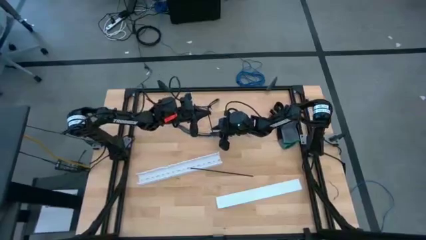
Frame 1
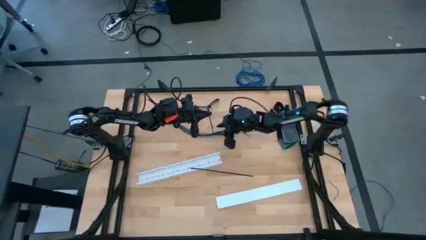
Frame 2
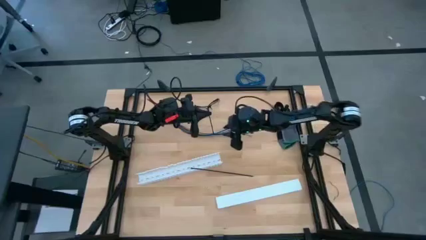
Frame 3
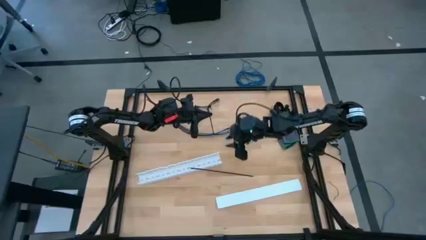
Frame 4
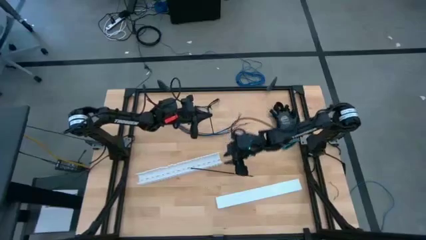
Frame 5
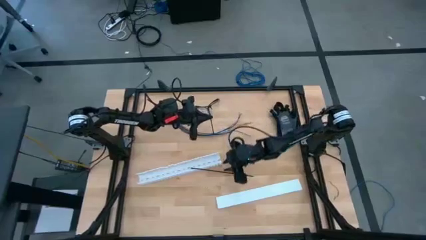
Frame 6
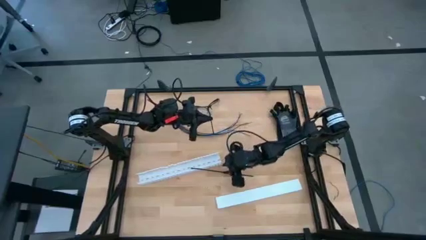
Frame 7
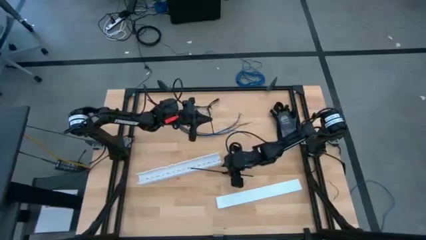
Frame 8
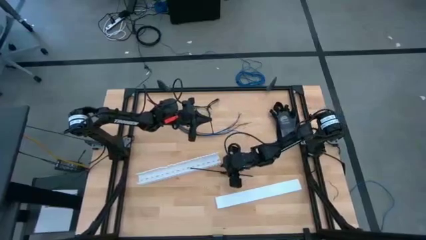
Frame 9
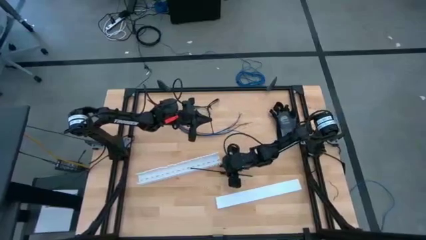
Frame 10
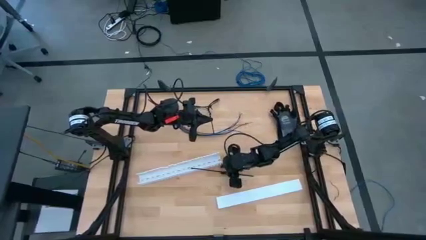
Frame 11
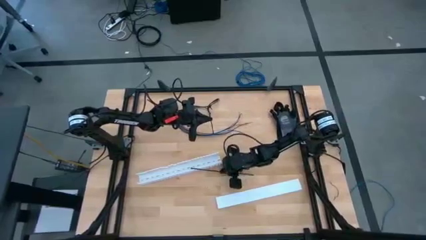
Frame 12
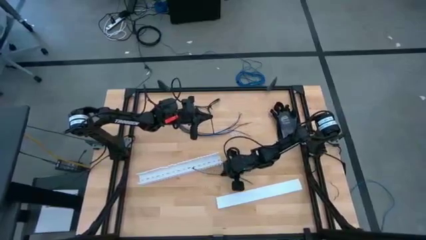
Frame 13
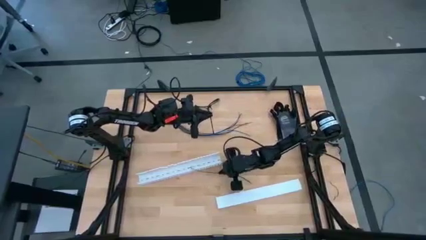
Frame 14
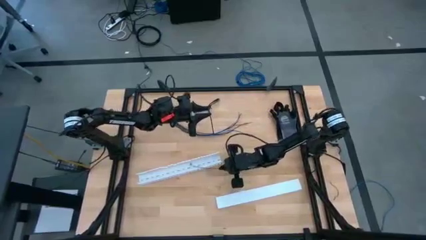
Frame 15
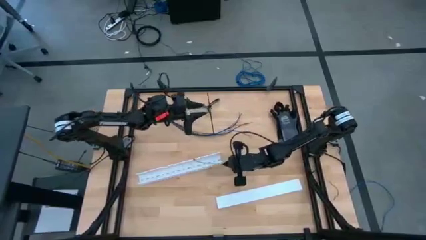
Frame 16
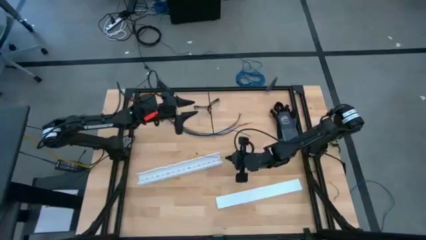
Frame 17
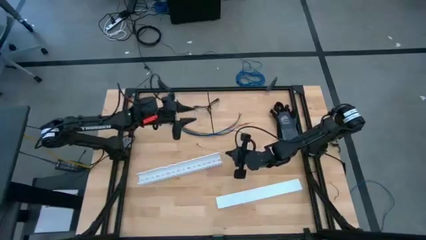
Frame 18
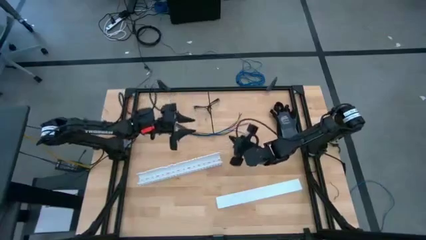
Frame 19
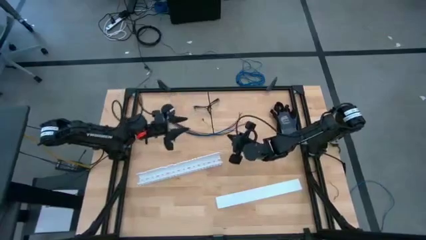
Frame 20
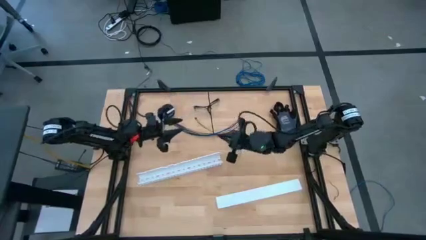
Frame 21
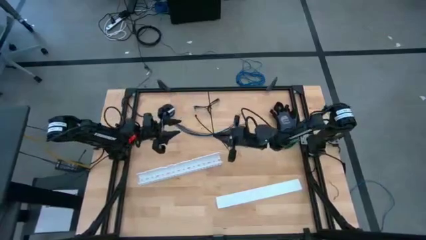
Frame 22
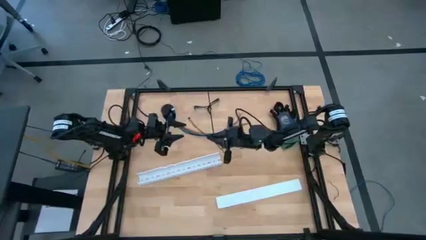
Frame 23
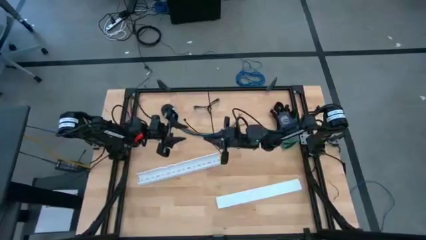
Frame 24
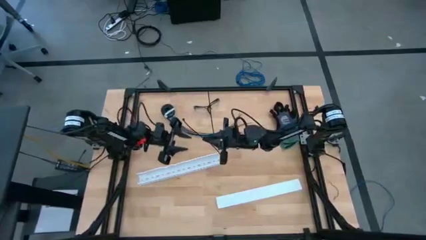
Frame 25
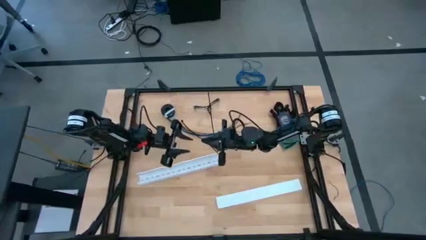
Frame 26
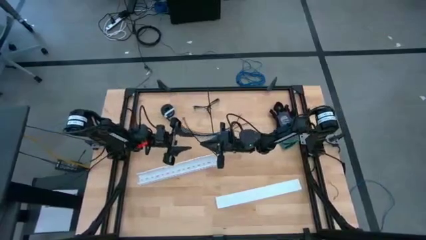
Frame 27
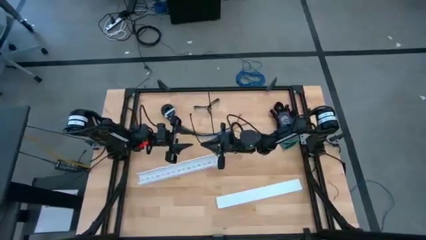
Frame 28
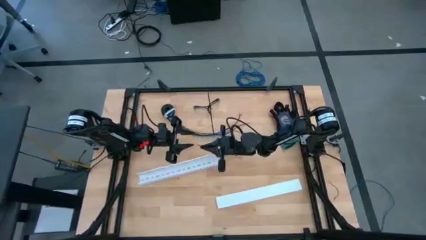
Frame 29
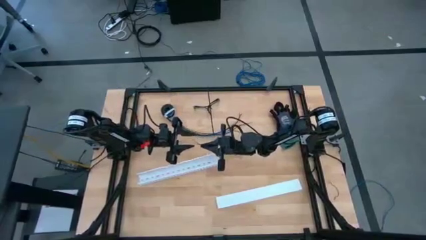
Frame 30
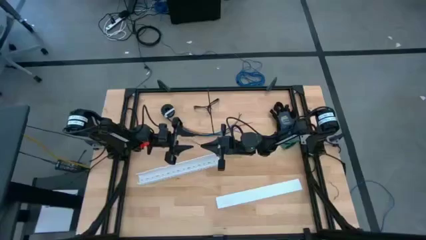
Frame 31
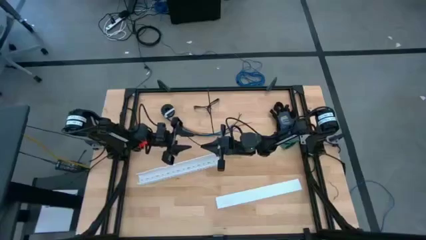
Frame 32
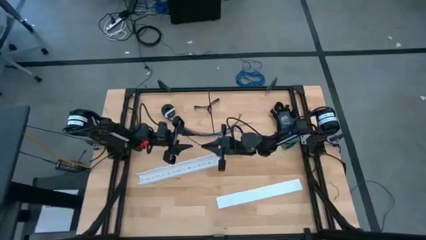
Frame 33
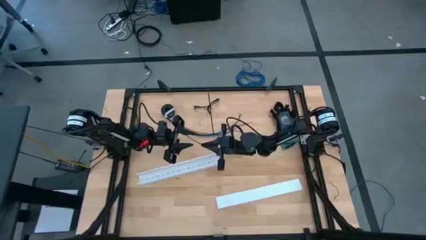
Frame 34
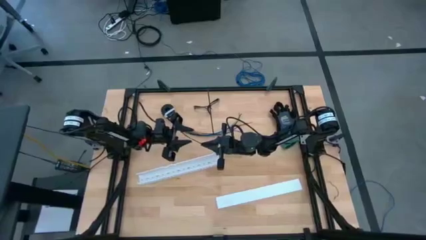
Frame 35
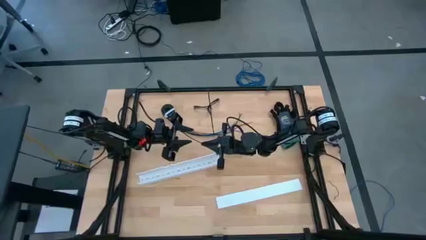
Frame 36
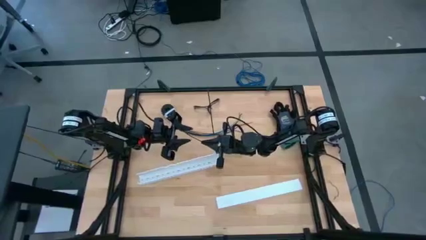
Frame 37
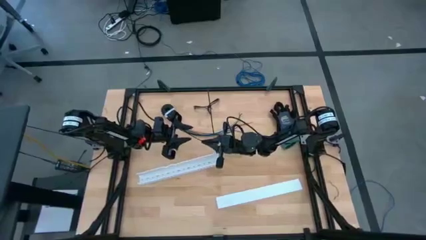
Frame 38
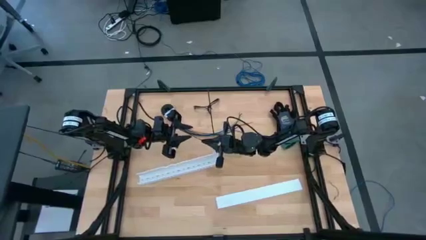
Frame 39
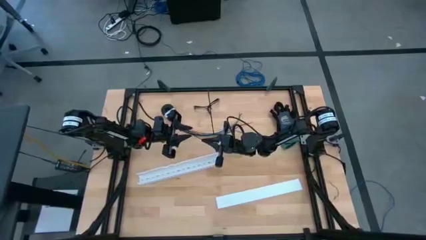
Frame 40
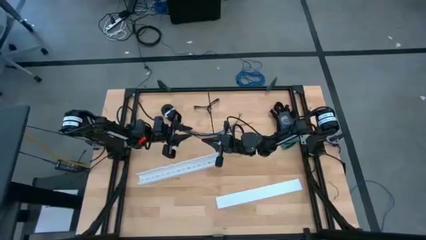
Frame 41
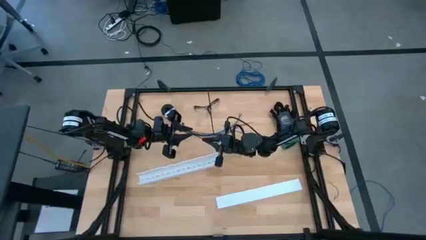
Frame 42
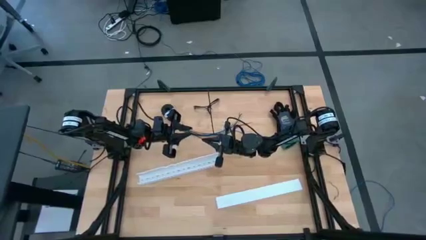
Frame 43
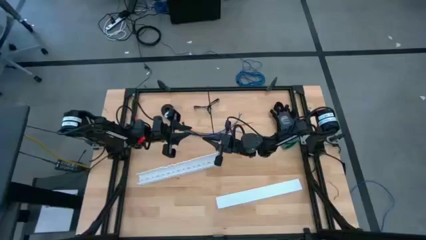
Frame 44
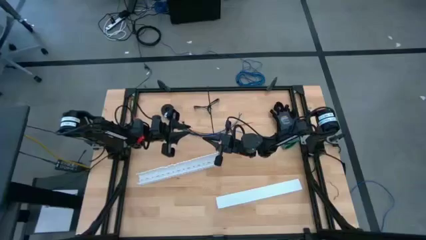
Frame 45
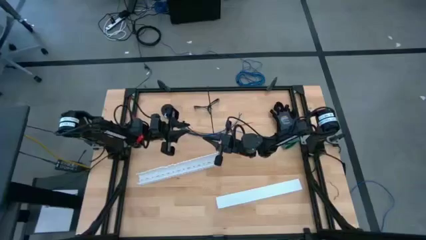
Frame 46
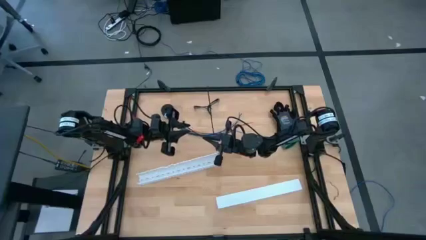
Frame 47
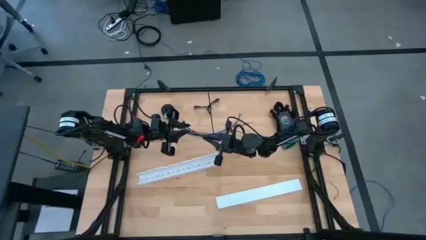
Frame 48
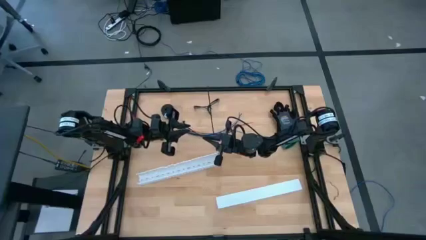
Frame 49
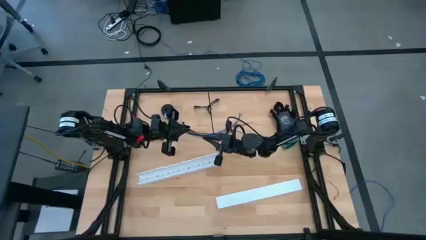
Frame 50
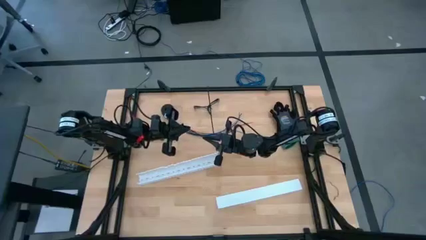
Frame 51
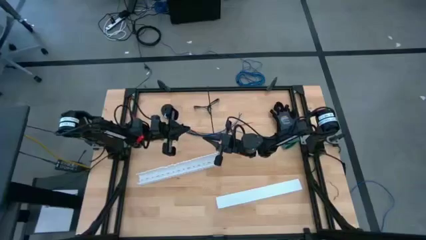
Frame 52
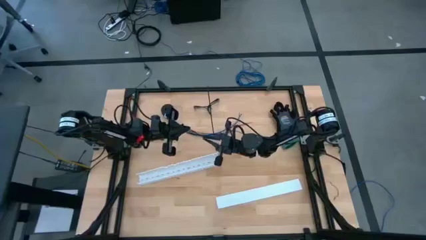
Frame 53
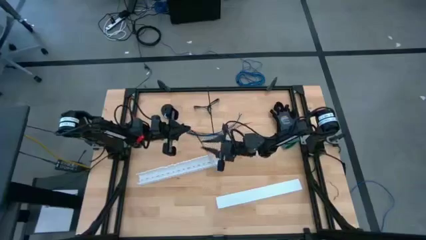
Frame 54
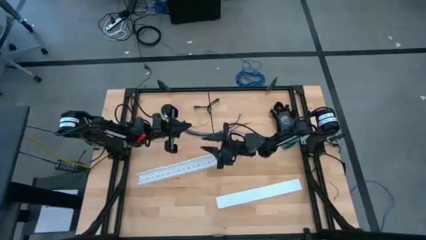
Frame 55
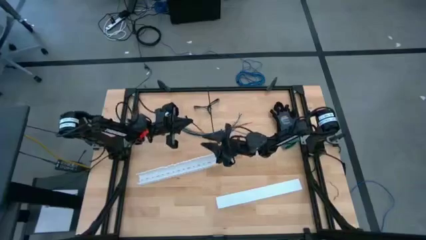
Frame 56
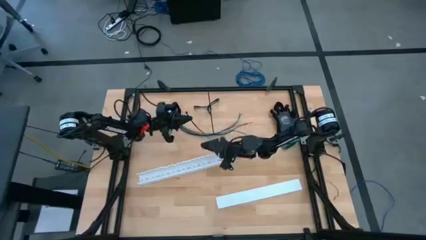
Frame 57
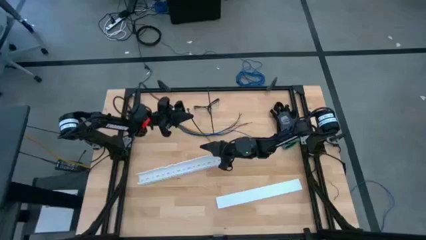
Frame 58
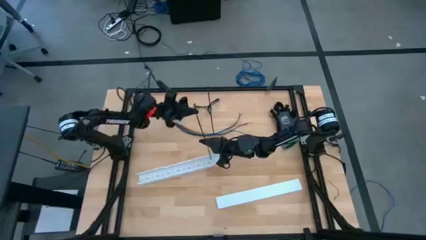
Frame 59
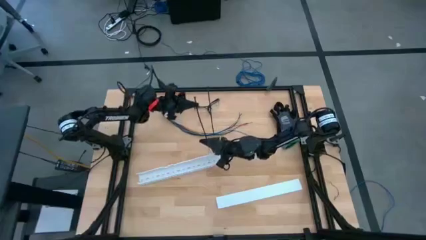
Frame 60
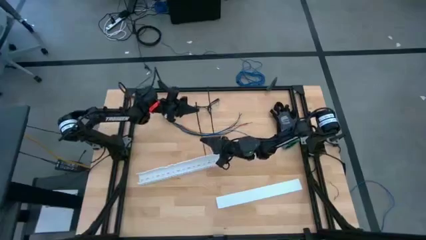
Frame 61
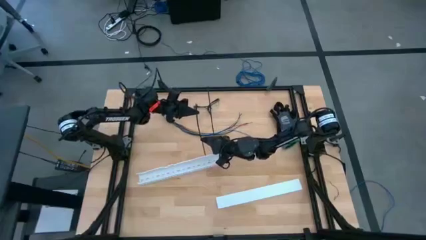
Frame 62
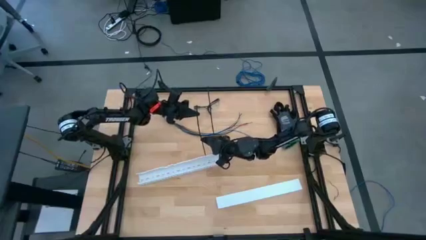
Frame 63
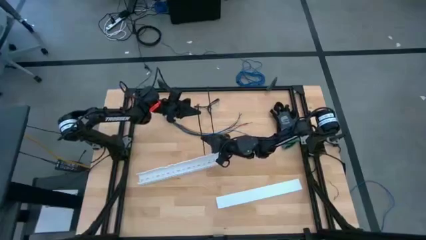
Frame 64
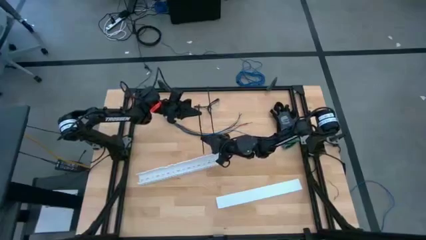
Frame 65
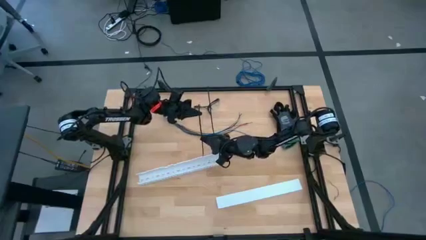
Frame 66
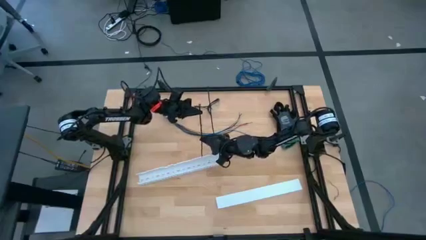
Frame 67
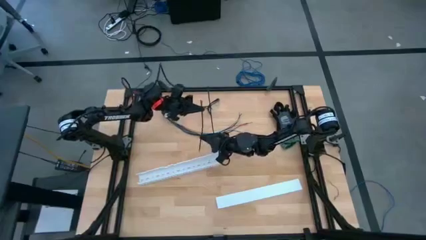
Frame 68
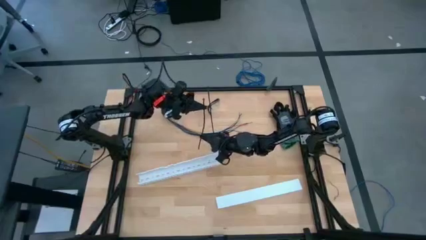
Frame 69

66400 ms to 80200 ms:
Task: Ziptie cables
Insert the black zip tie into the locking head
